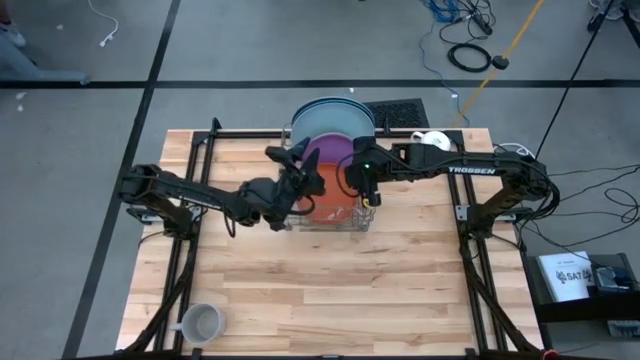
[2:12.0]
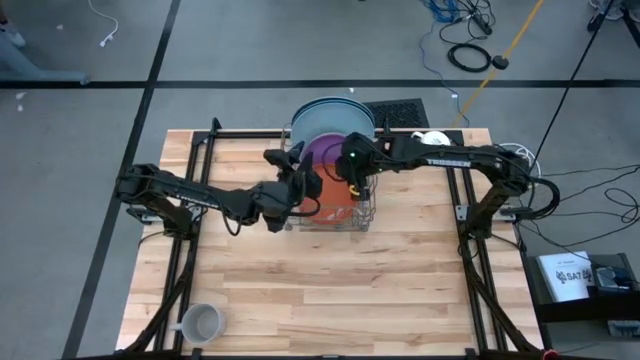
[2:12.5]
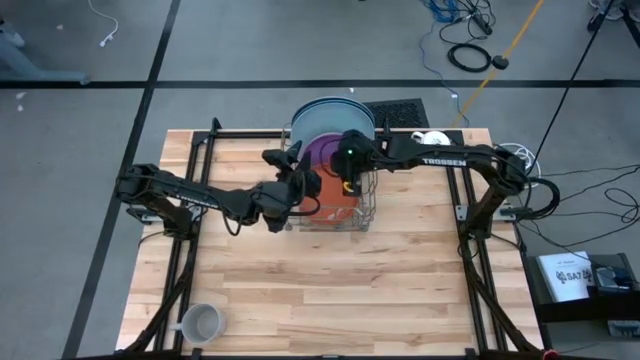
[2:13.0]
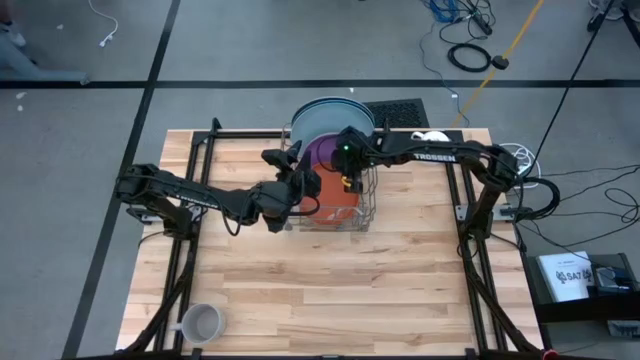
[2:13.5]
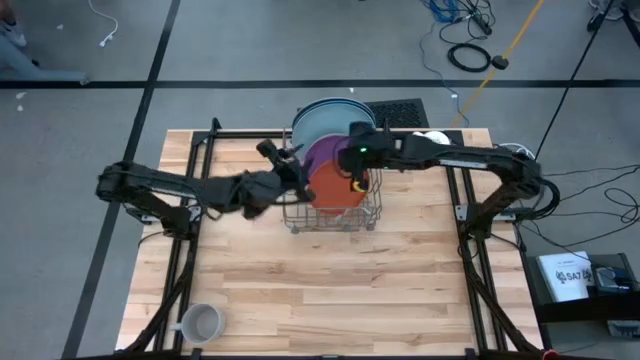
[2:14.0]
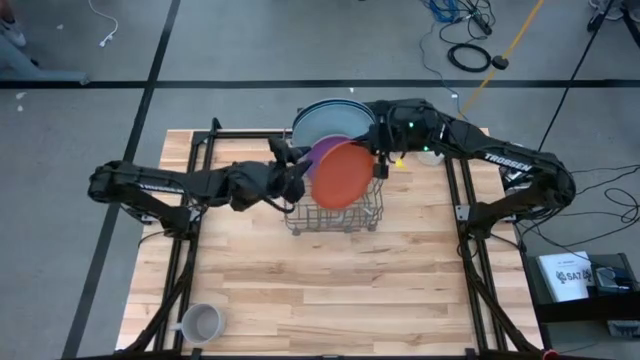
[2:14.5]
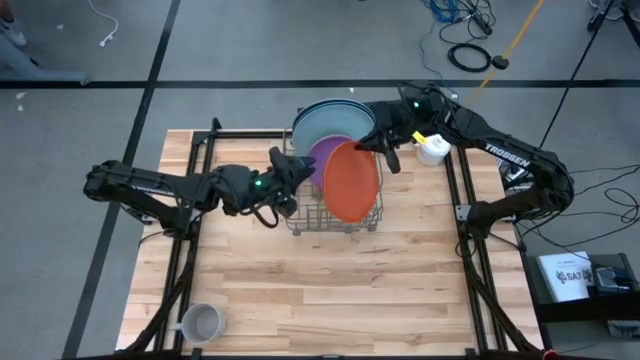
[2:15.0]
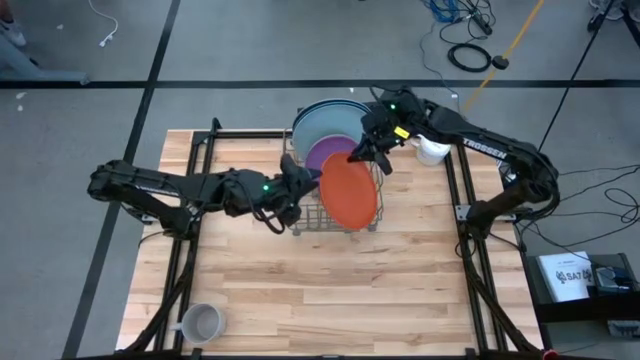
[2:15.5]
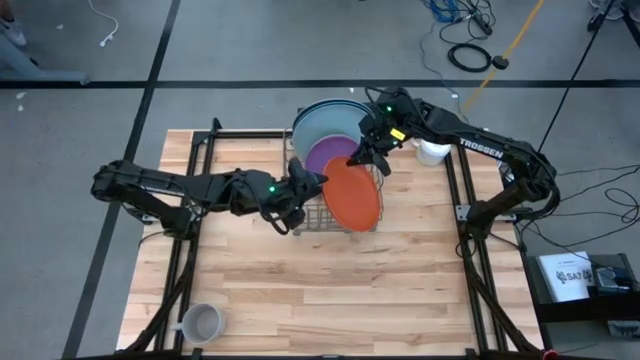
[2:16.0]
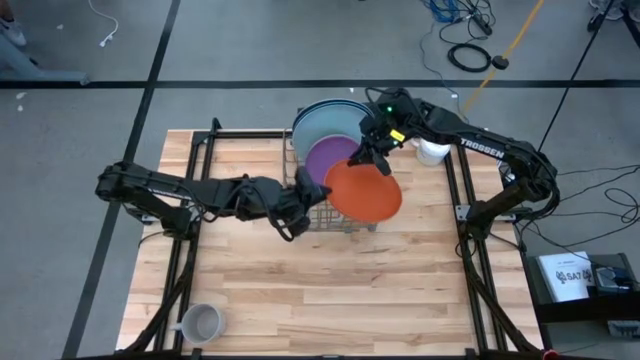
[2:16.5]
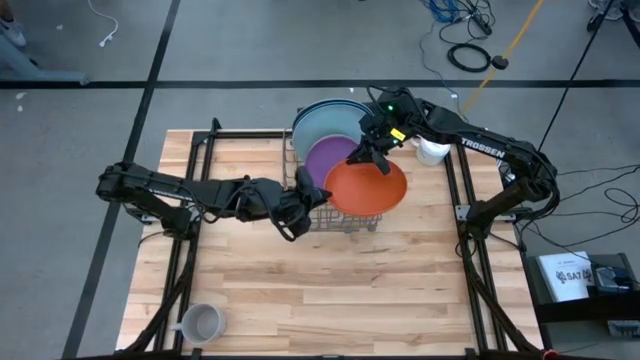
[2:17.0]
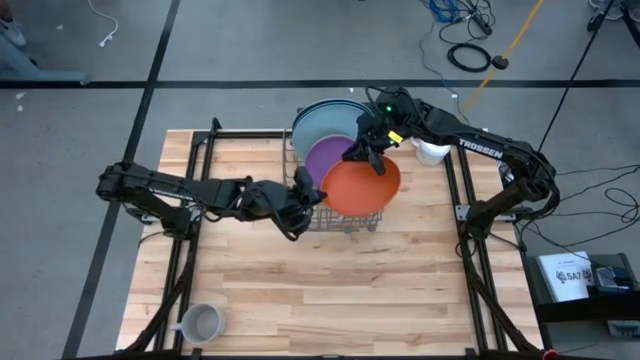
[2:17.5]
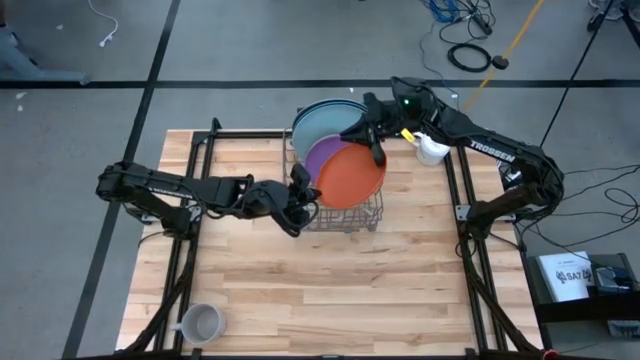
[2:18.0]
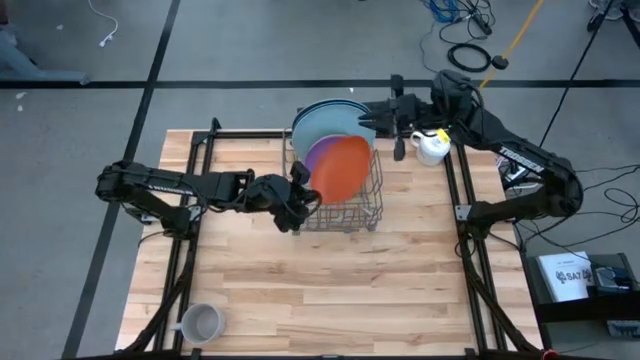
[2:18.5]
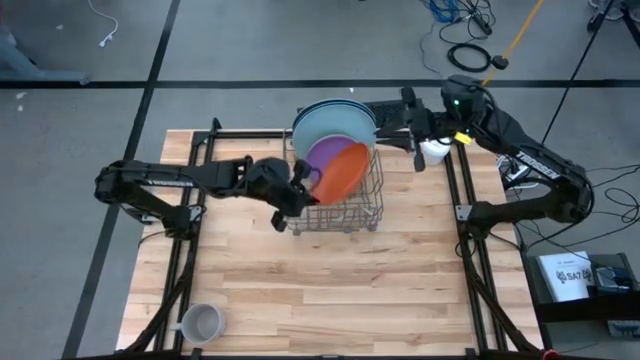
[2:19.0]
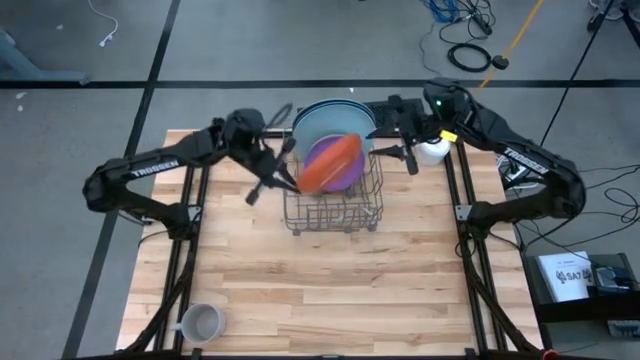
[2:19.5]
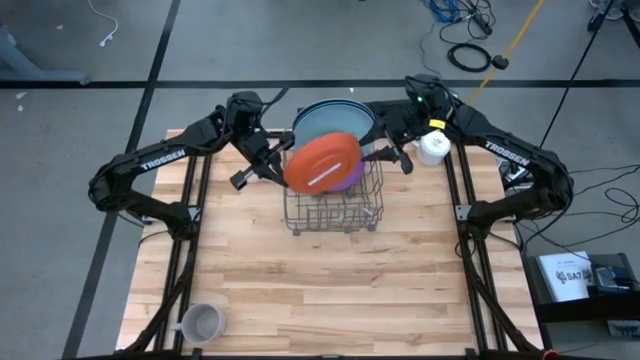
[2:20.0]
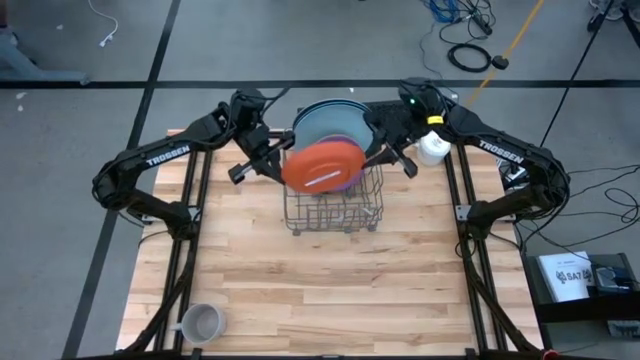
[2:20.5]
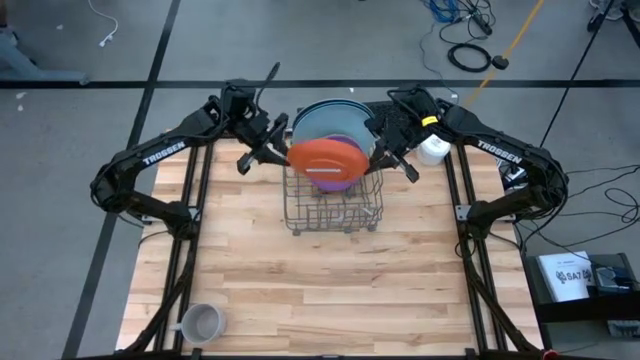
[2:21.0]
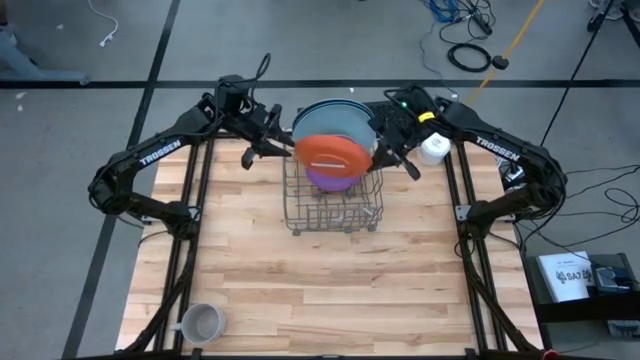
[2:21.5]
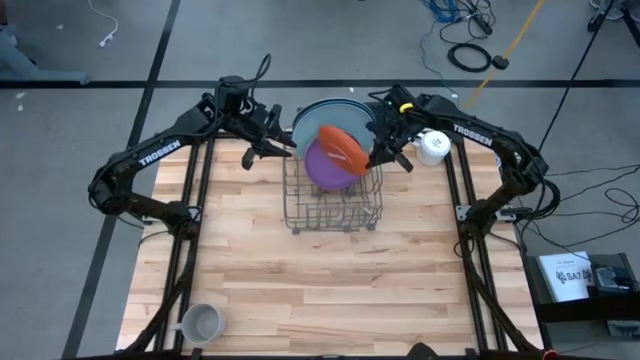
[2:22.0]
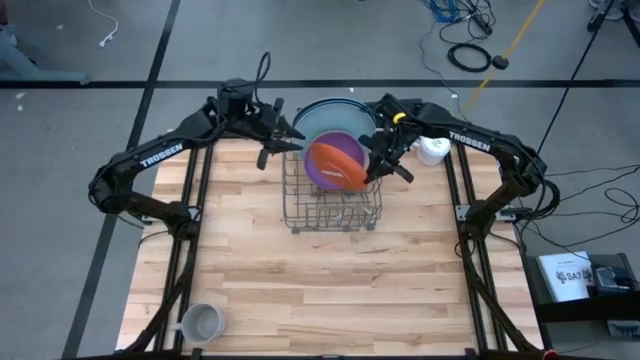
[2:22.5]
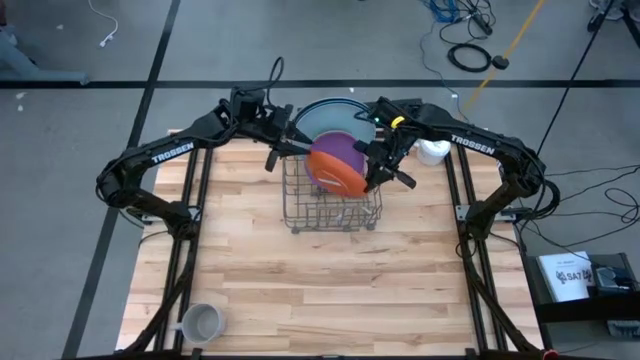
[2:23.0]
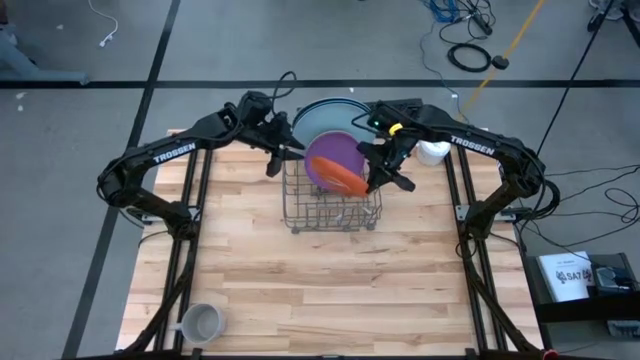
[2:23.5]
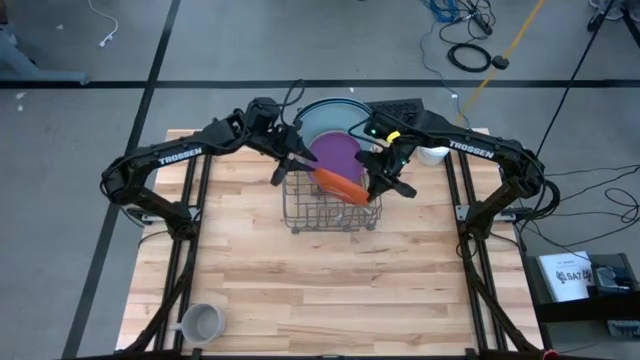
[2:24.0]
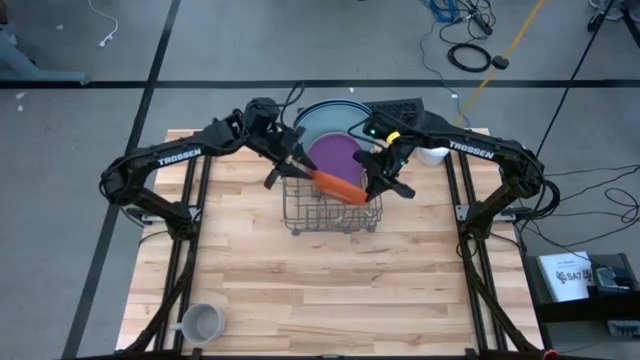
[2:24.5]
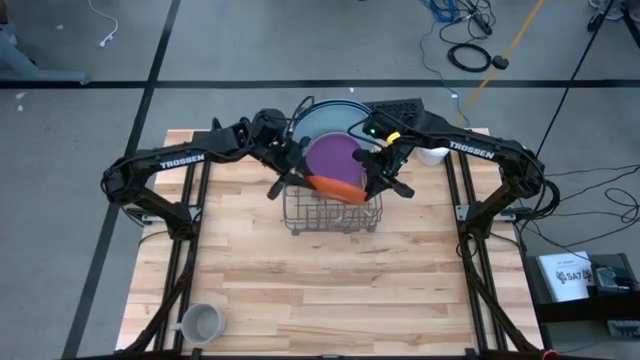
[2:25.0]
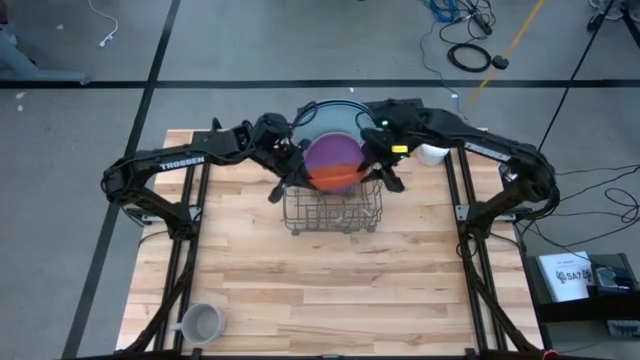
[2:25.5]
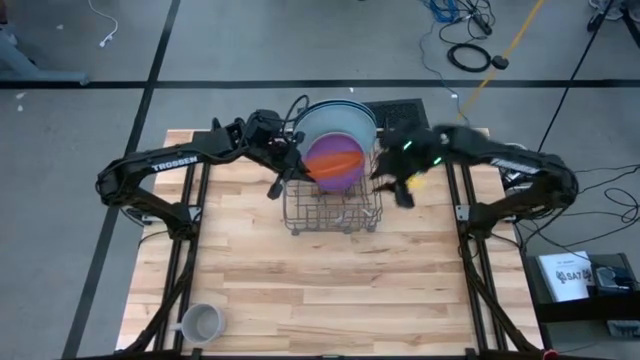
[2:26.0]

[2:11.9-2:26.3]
Task: Sort dishes
Put the orange plate into the dish rack

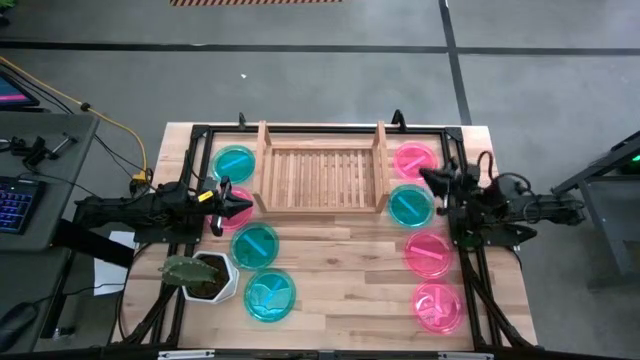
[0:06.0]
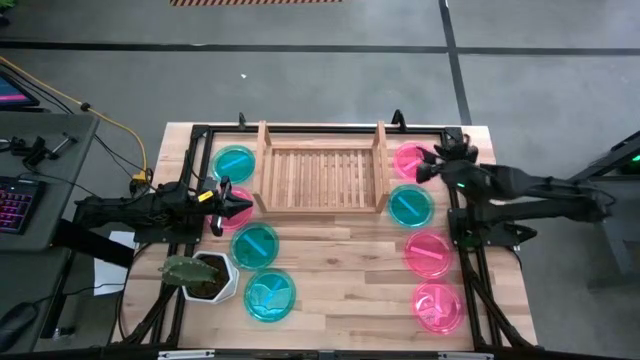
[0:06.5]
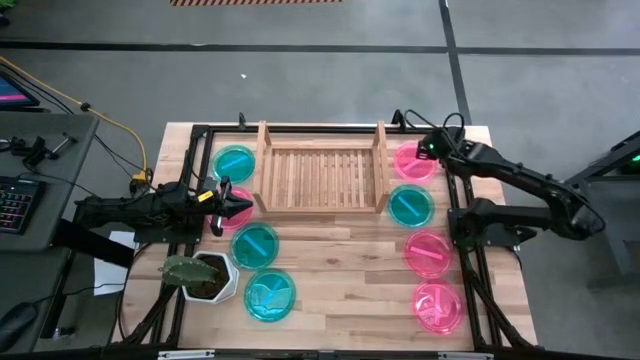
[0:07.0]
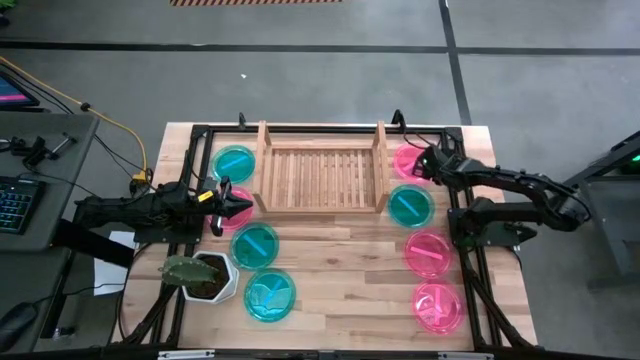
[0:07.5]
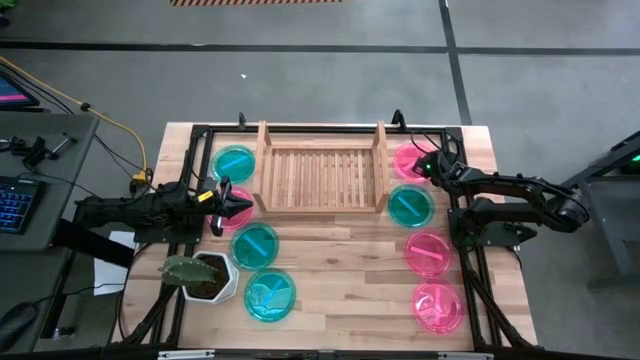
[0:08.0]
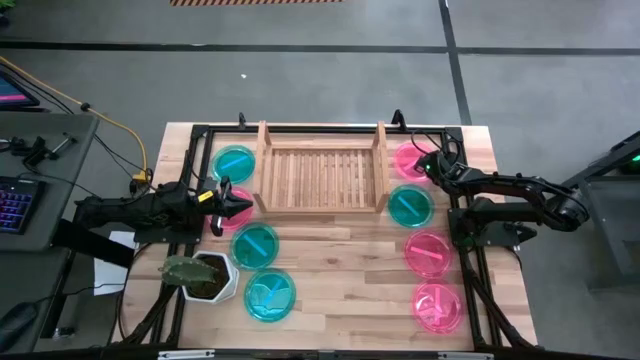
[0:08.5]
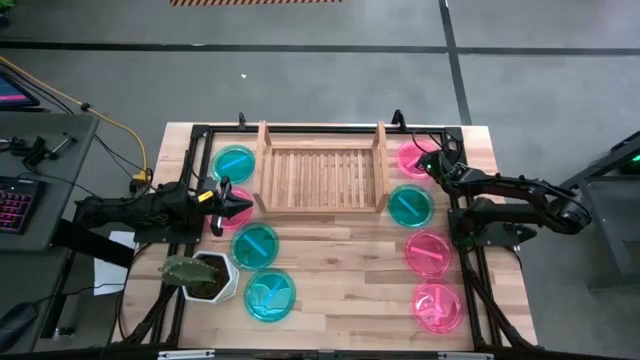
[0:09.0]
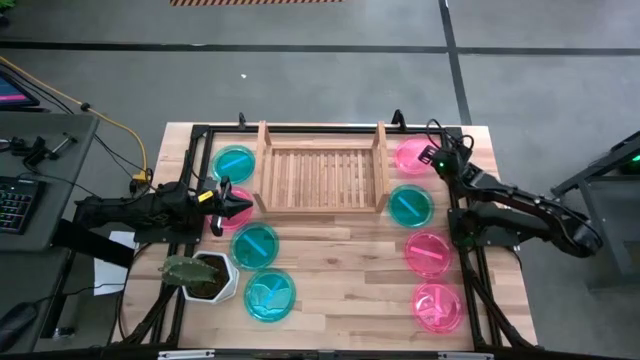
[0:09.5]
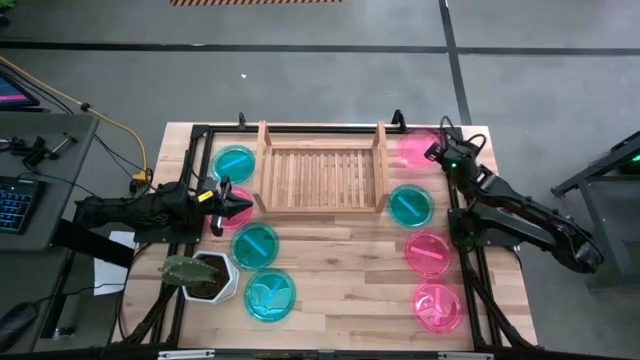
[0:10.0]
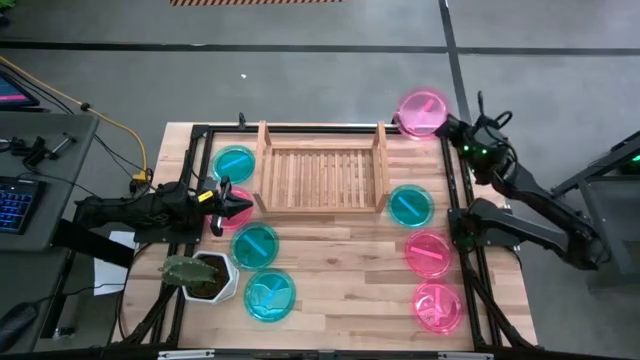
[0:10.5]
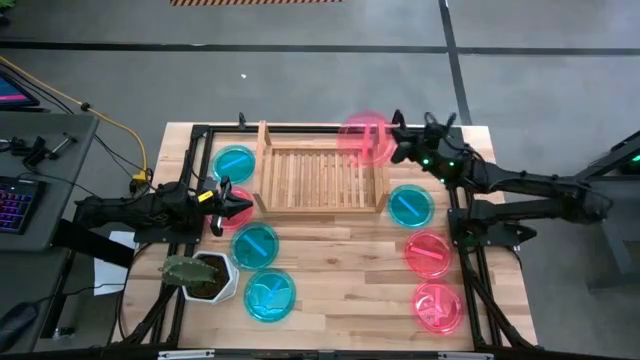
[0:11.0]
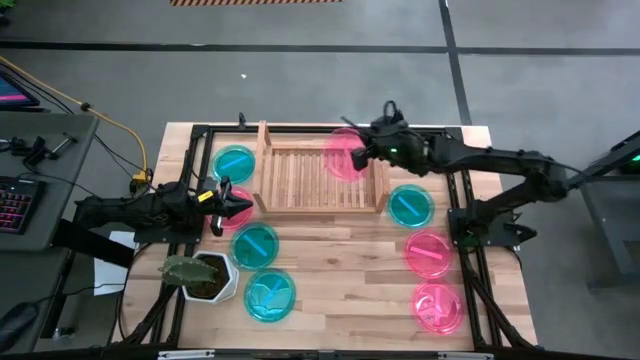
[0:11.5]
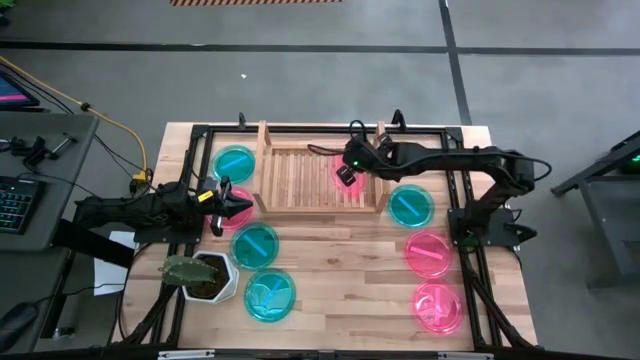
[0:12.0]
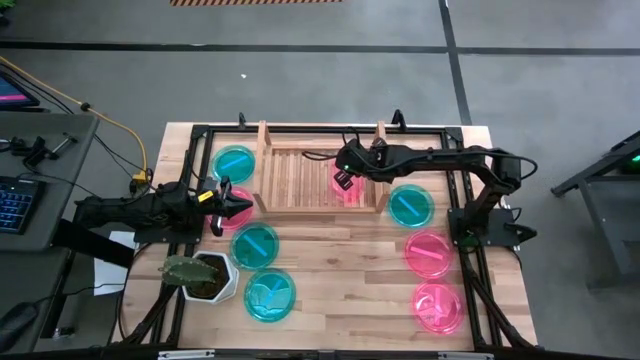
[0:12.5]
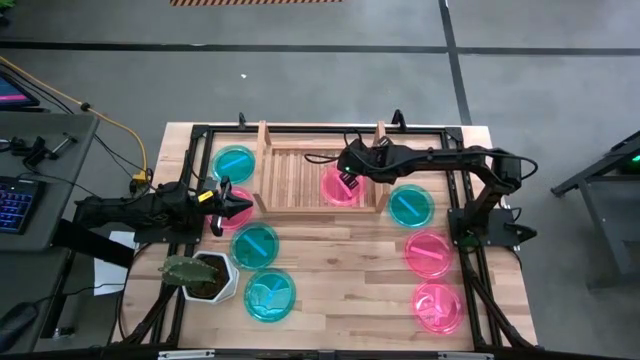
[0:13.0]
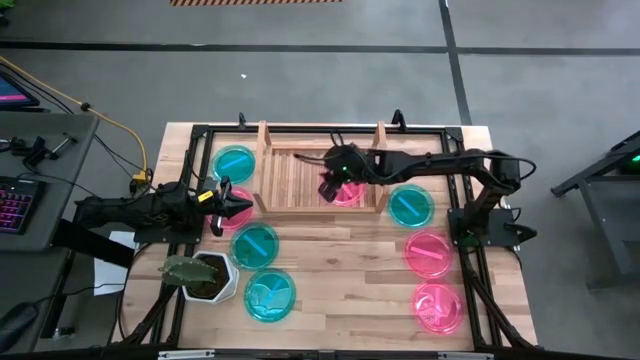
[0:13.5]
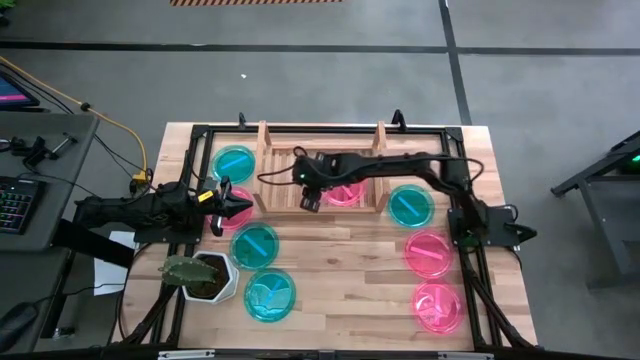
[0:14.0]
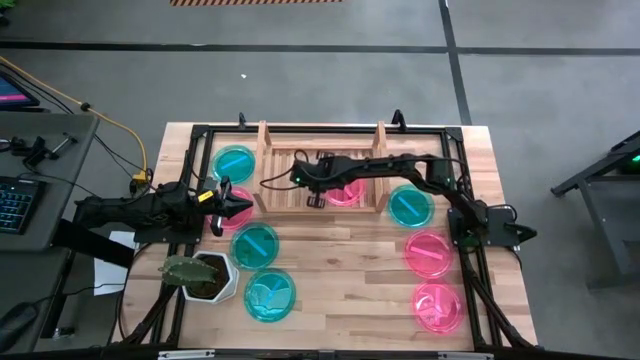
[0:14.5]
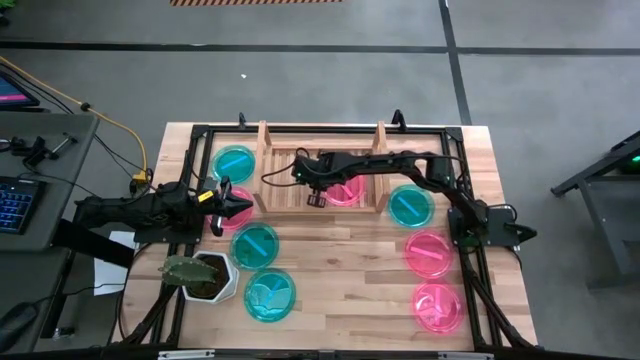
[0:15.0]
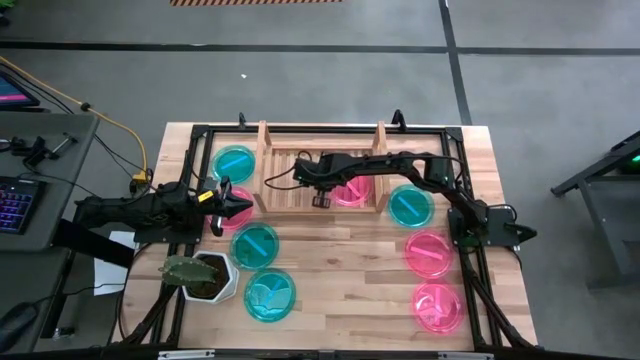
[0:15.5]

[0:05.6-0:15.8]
Task: Place and stack plates onto a shelf
Put the pink plate on the shelf
